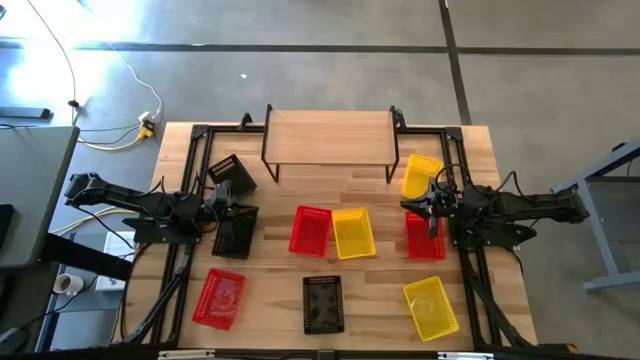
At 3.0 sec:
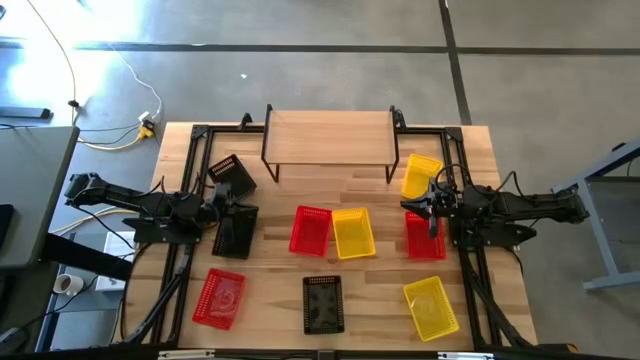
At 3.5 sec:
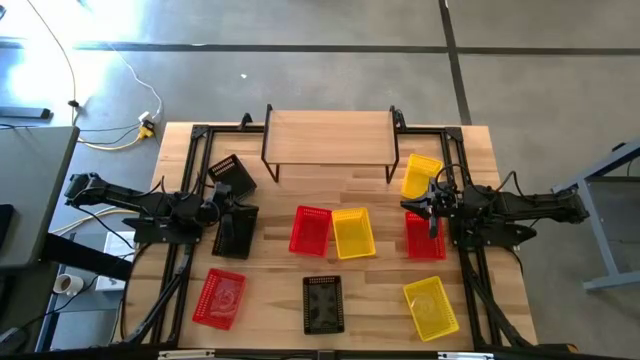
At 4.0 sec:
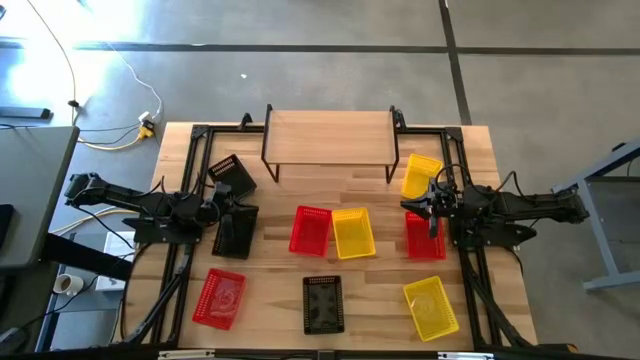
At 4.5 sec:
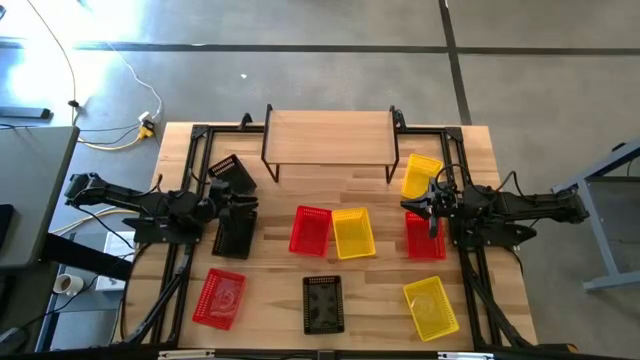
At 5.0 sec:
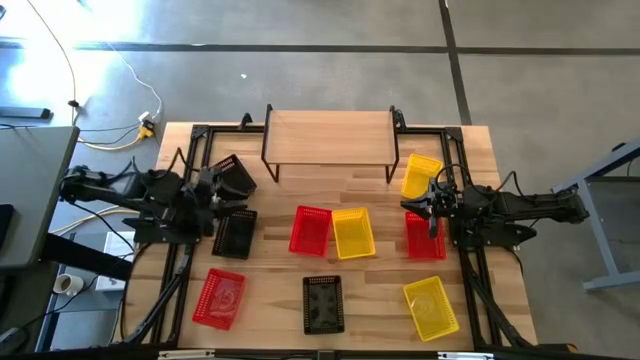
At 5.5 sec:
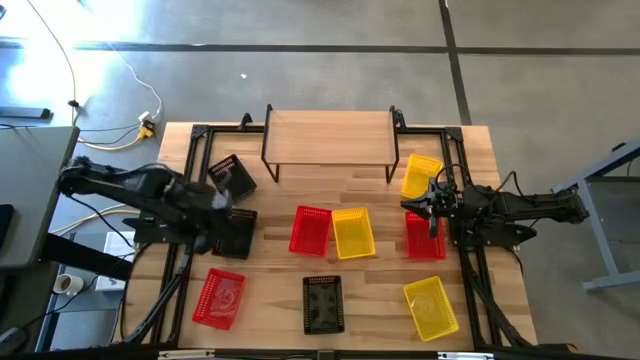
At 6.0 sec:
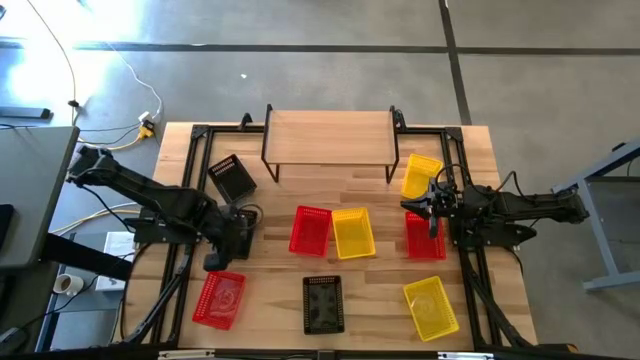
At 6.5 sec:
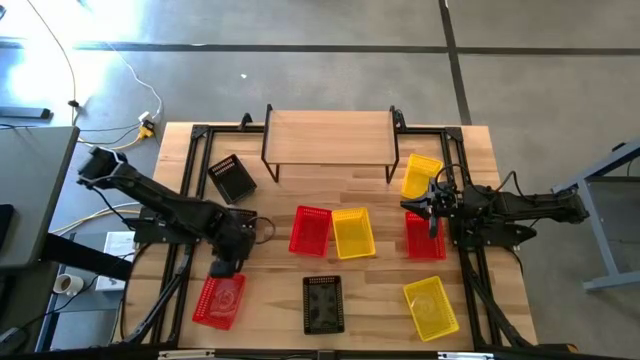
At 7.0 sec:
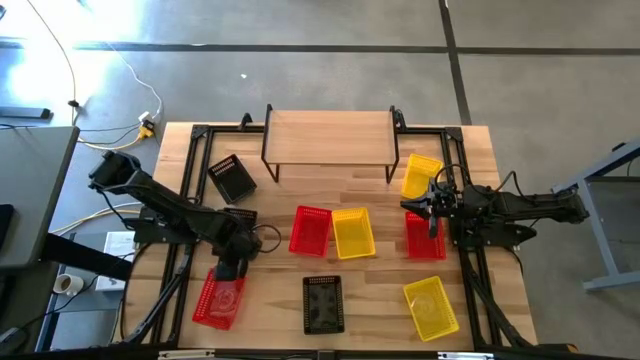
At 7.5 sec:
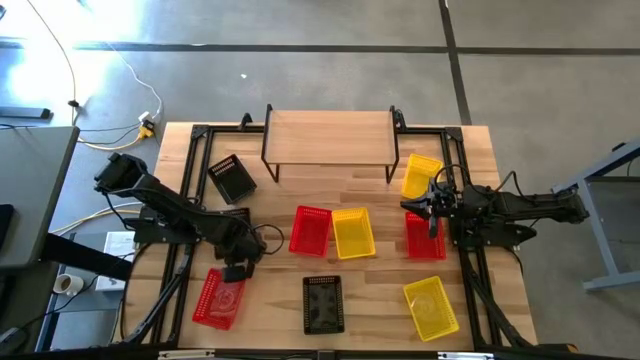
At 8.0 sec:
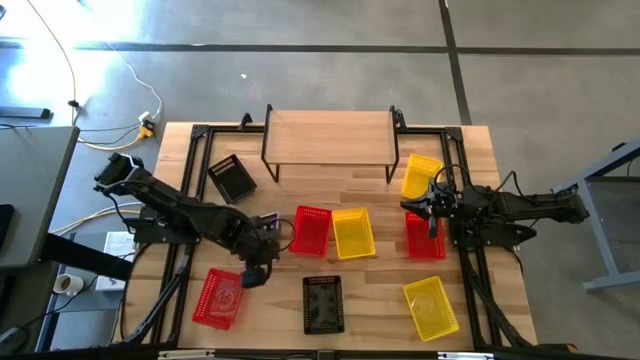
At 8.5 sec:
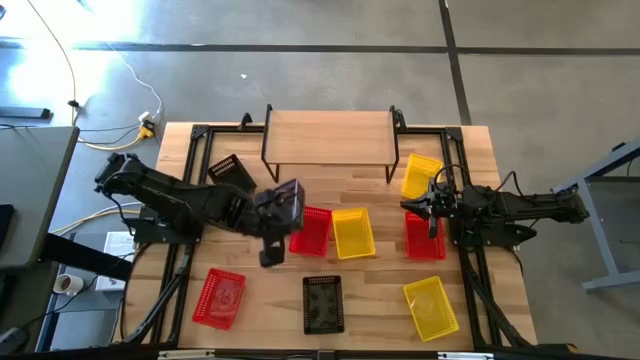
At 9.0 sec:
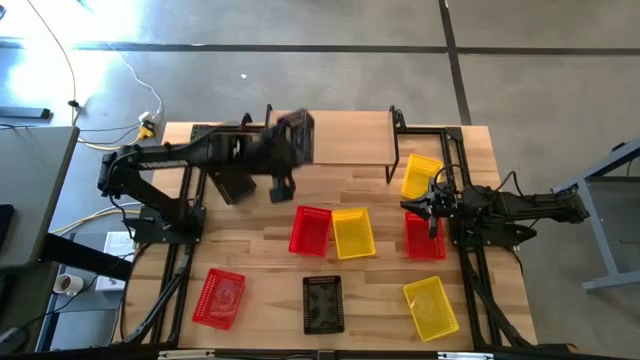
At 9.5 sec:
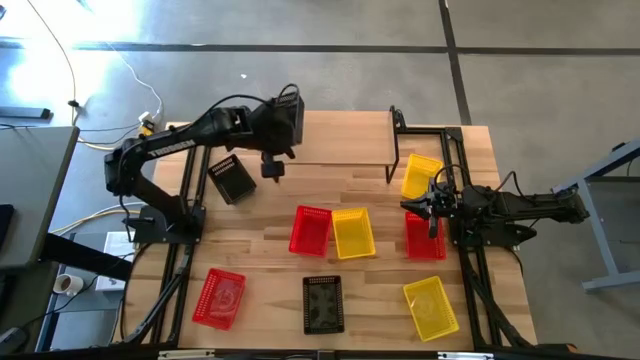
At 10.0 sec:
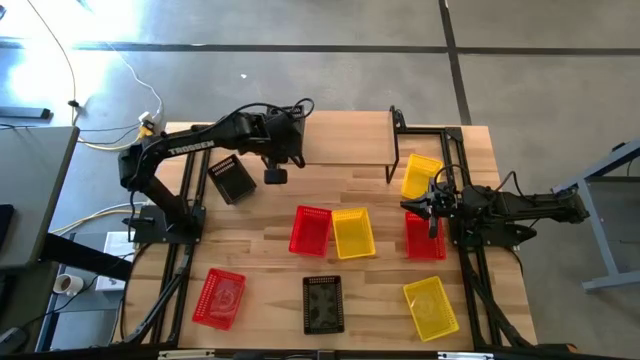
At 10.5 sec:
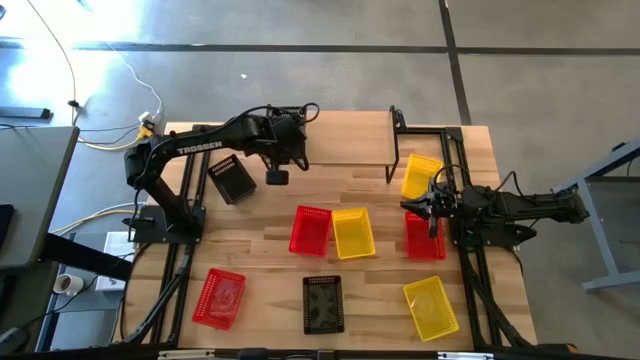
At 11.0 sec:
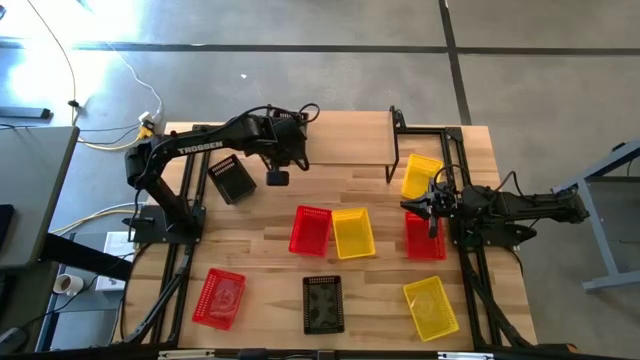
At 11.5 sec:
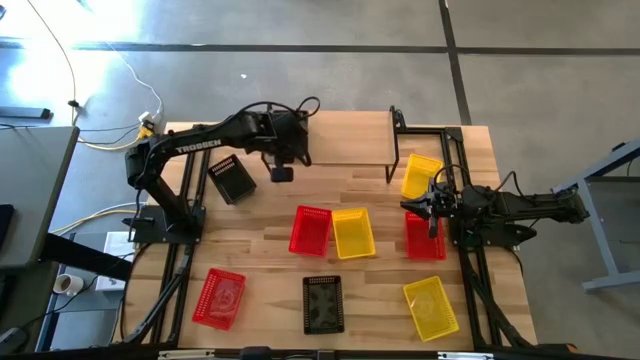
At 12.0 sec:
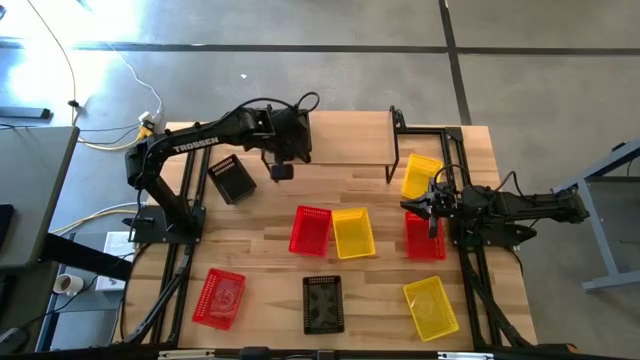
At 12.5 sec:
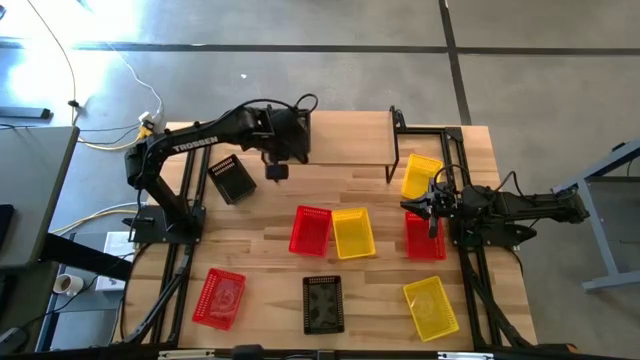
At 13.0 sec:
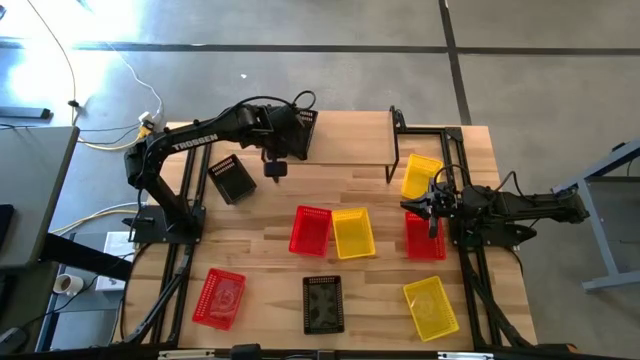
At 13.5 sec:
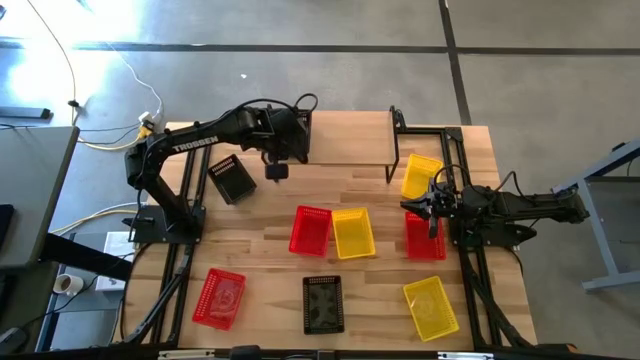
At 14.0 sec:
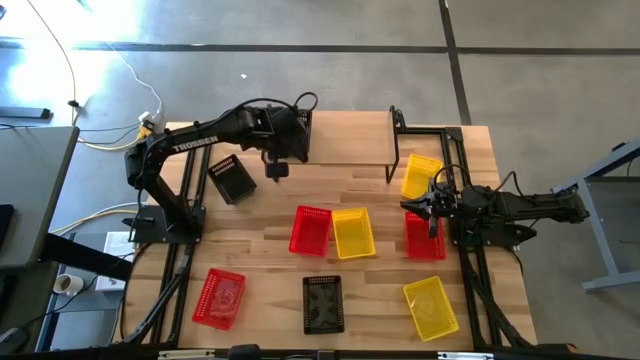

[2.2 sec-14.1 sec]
Task: Stack baskets on shelf by color
Put the middle left black basket on the shelf

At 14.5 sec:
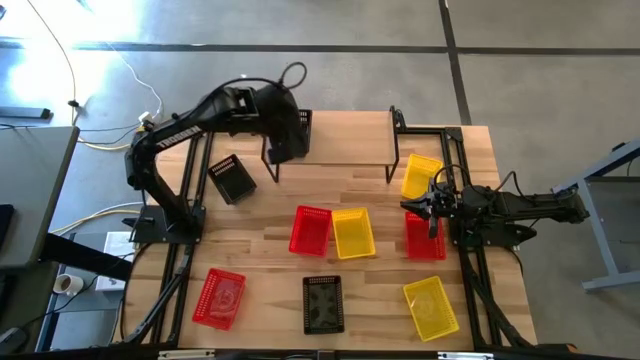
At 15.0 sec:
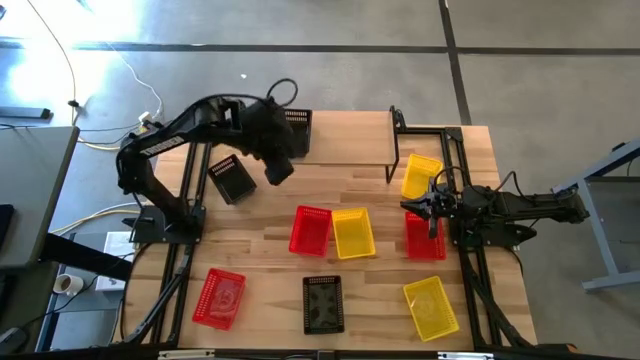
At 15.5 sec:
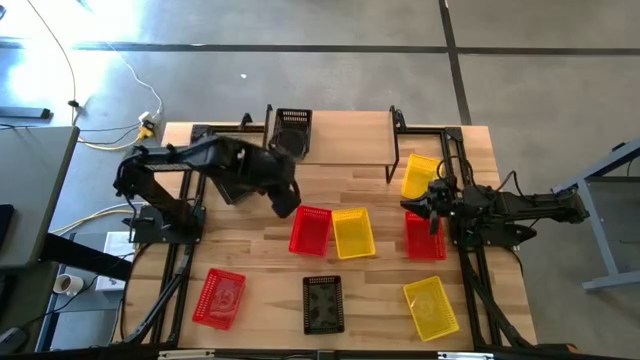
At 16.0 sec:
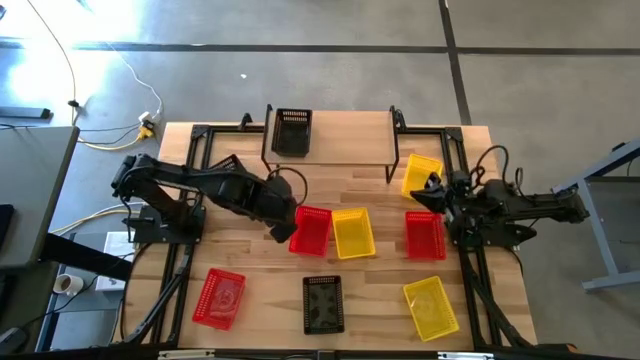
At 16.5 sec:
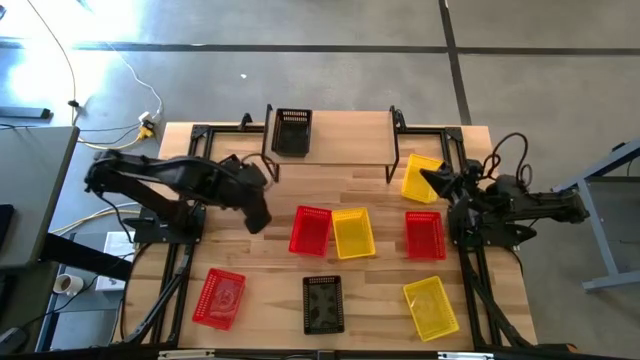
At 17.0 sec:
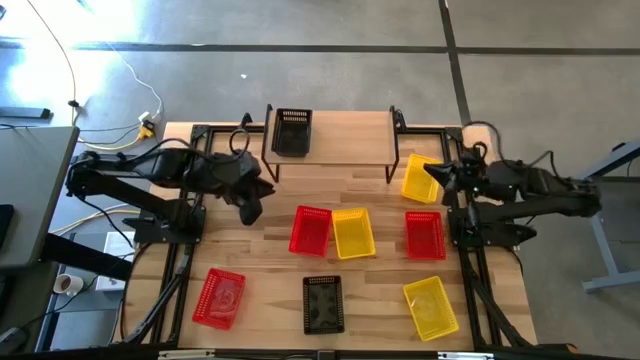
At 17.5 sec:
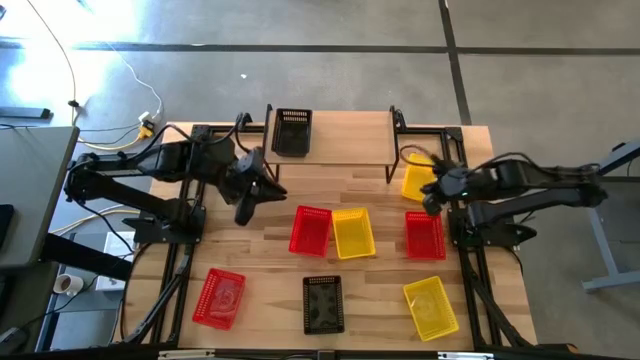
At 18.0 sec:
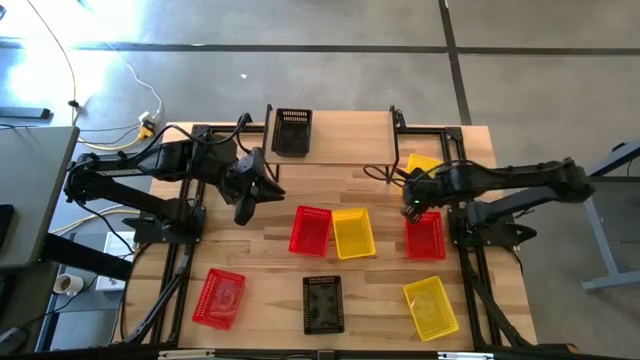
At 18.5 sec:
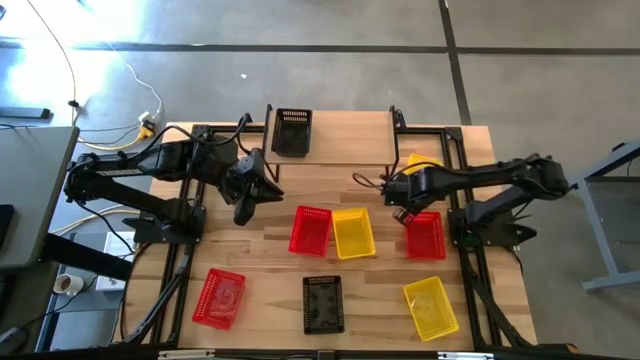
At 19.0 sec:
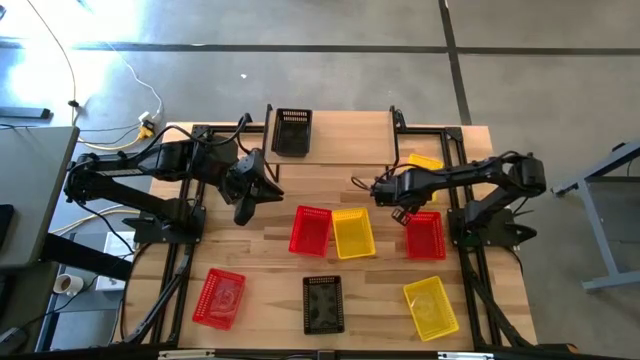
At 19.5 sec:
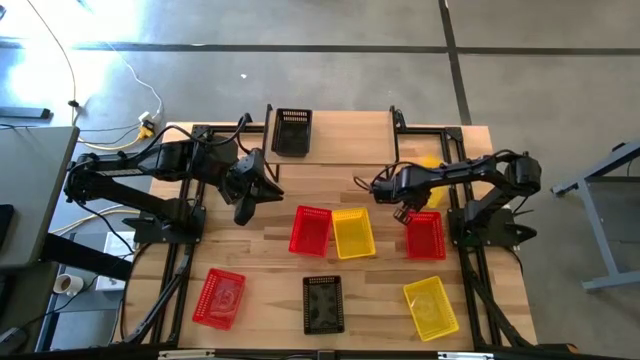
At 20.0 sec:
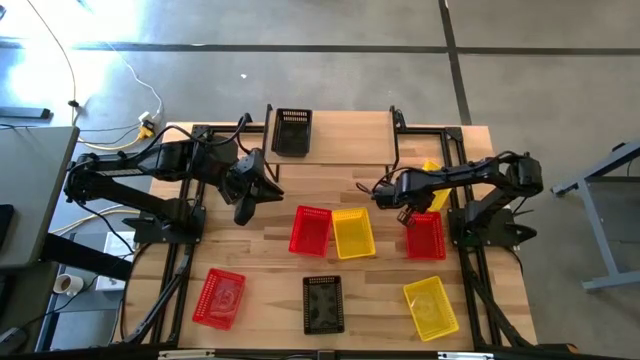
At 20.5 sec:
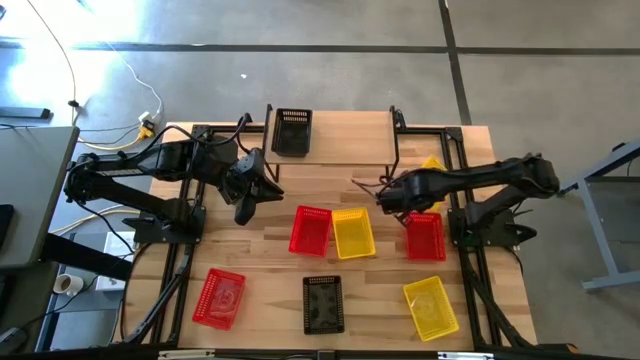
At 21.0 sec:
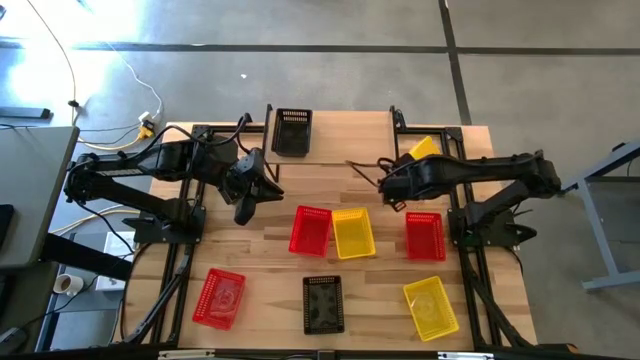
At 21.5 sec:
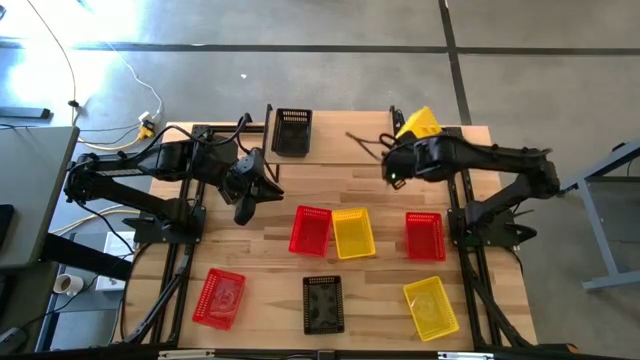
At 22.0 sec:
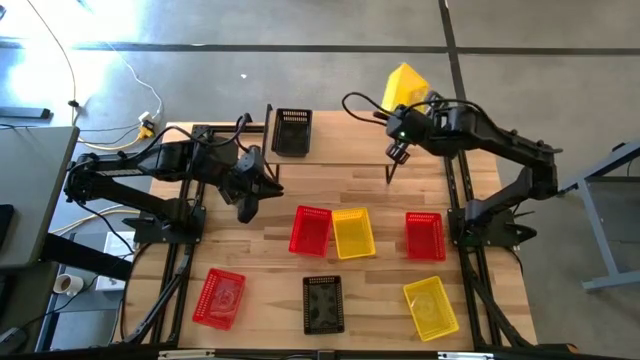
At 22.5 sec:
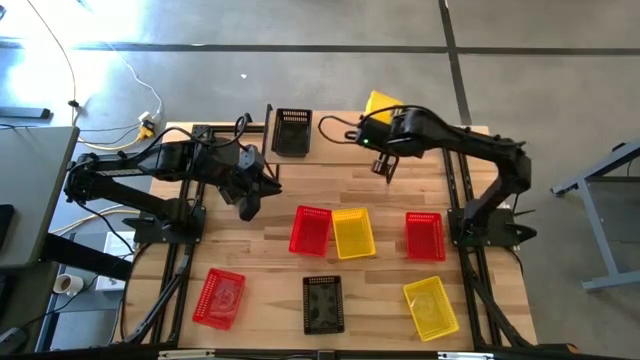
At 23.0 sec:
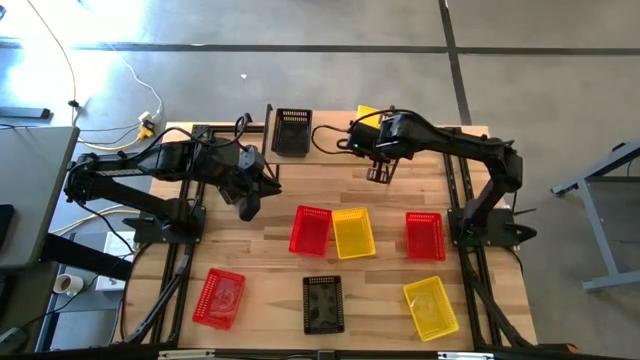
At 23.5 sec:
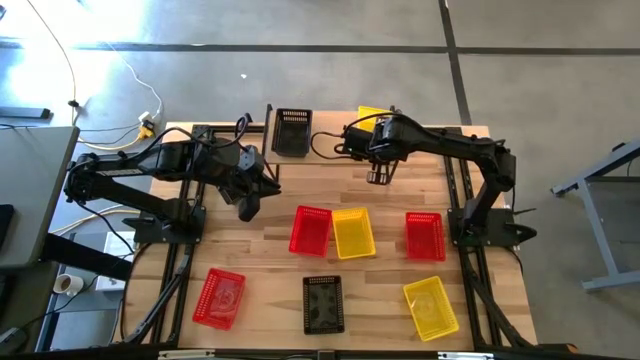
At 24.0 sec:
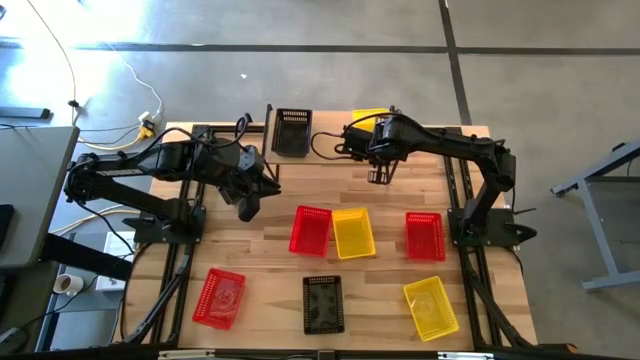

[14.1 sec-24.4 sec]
Put the top yellow basket on the shelf
